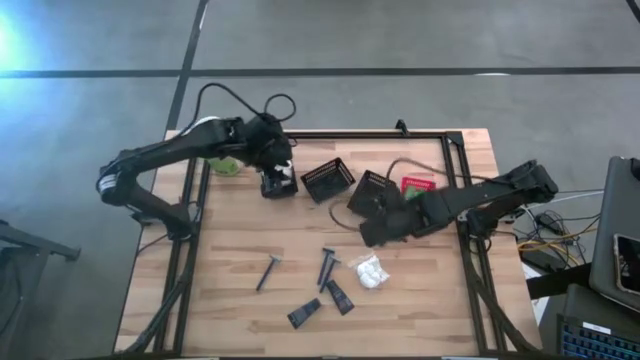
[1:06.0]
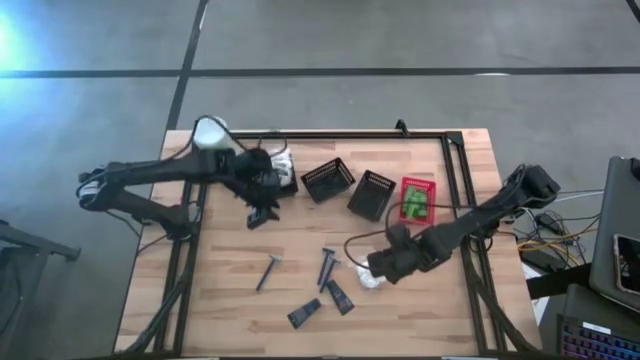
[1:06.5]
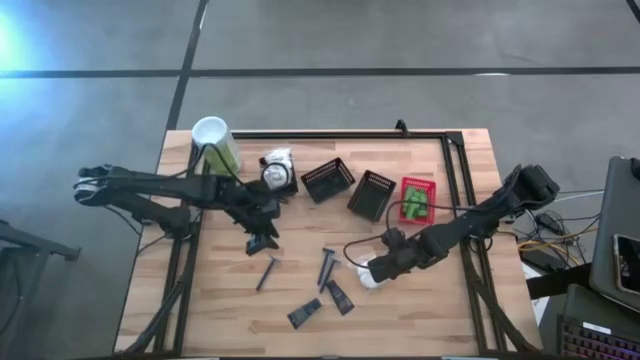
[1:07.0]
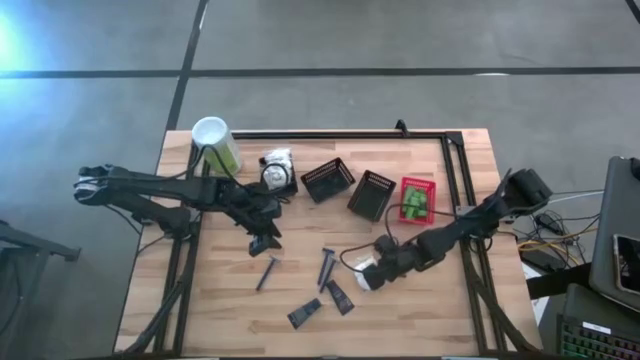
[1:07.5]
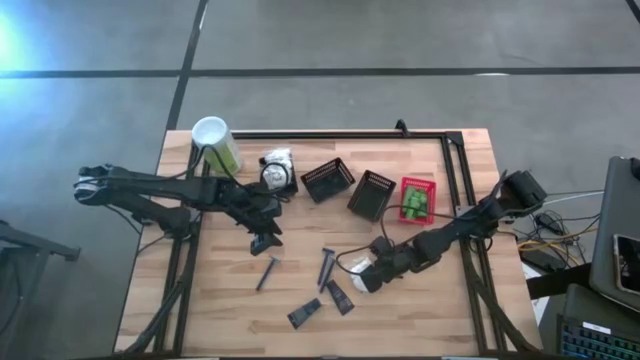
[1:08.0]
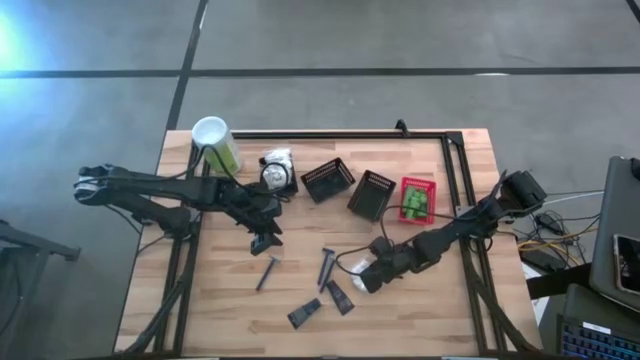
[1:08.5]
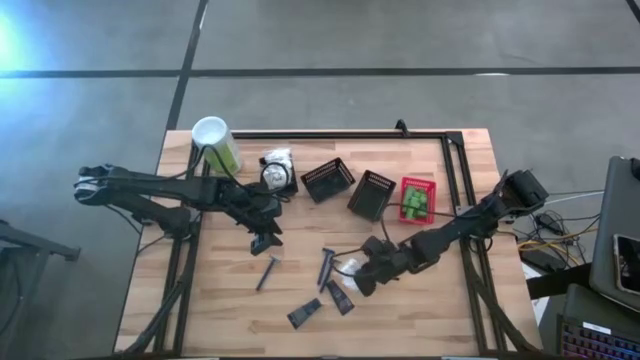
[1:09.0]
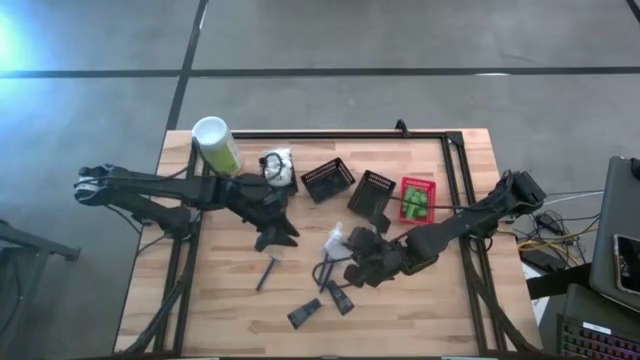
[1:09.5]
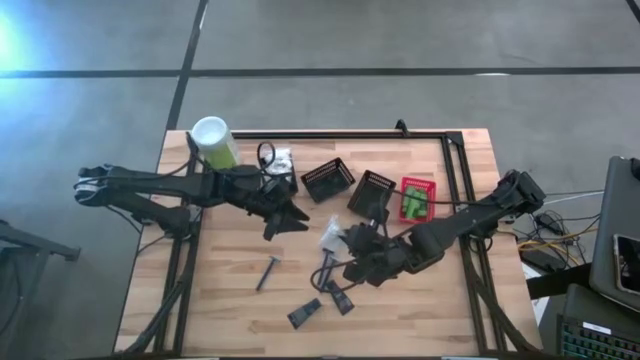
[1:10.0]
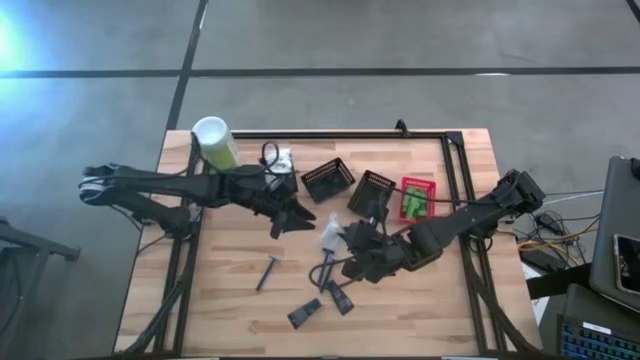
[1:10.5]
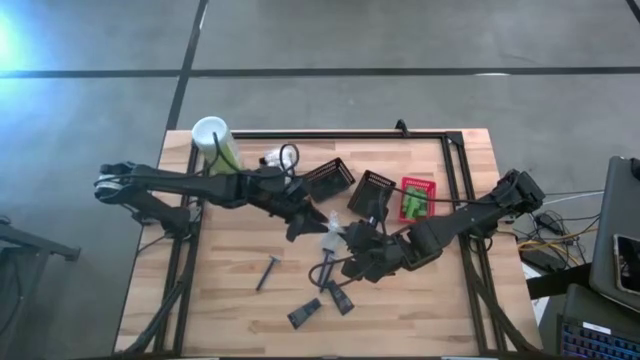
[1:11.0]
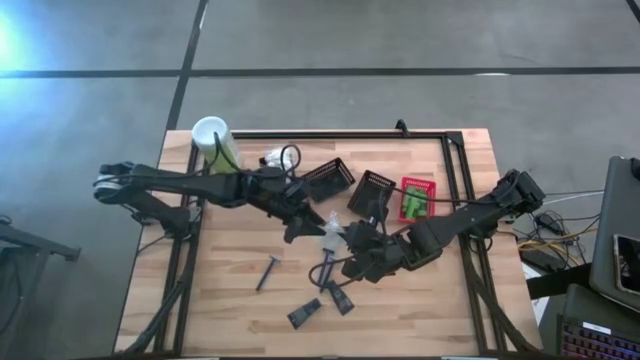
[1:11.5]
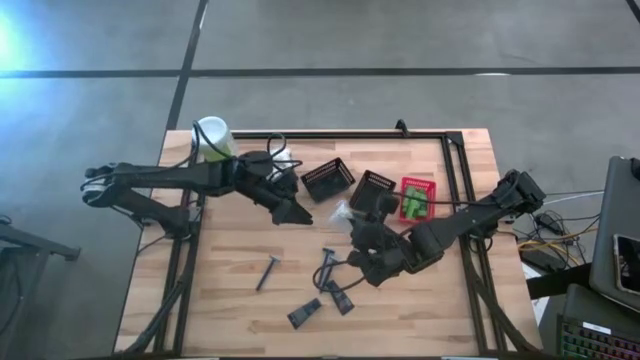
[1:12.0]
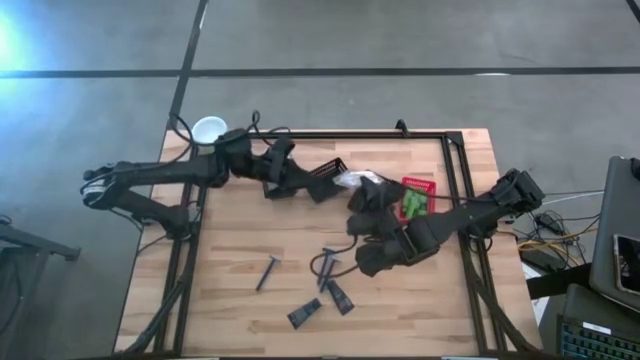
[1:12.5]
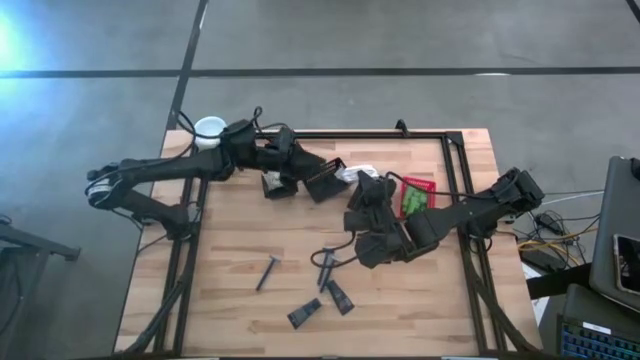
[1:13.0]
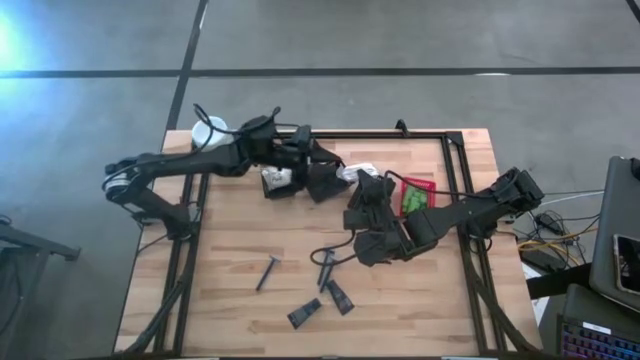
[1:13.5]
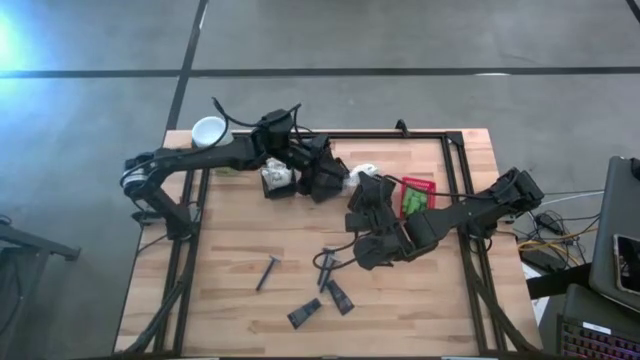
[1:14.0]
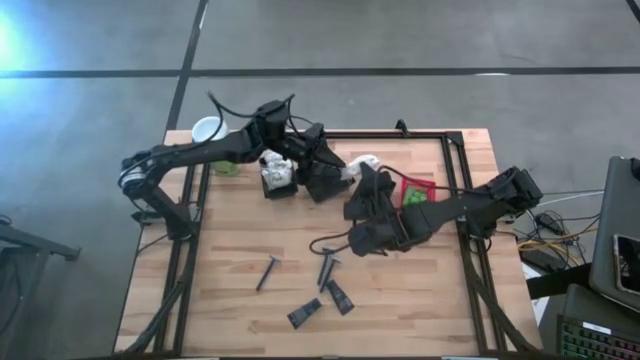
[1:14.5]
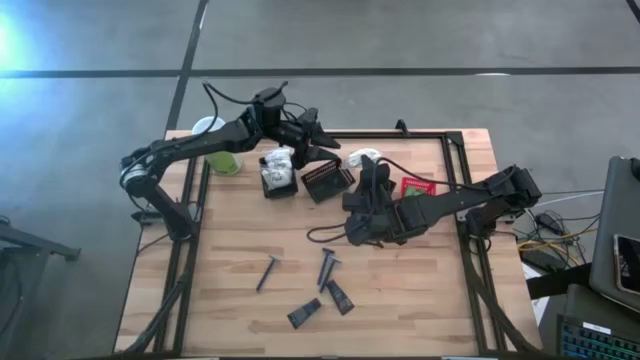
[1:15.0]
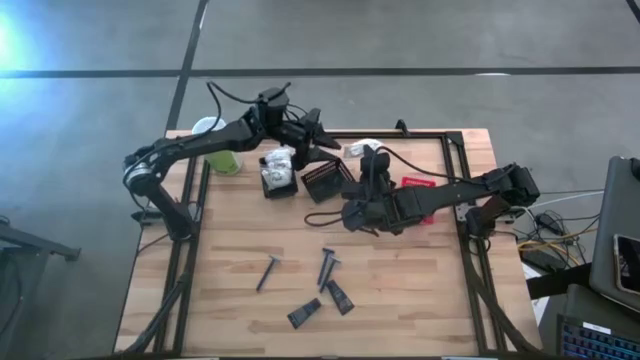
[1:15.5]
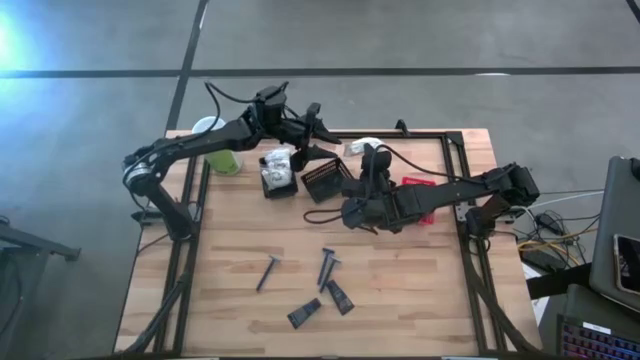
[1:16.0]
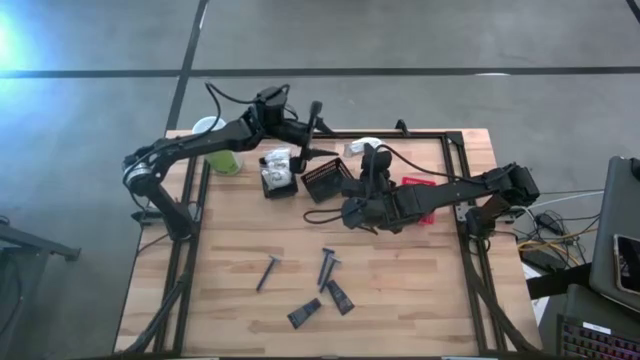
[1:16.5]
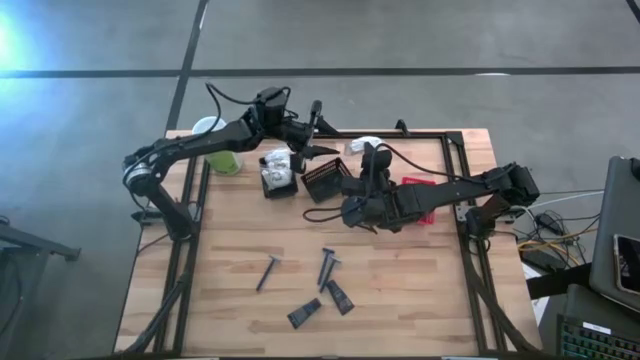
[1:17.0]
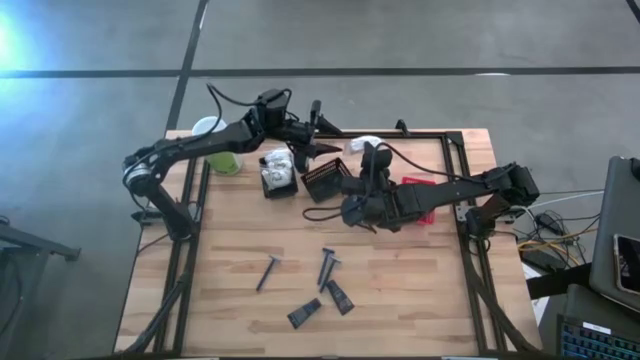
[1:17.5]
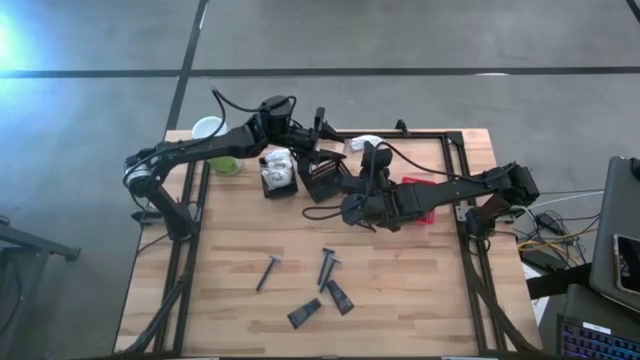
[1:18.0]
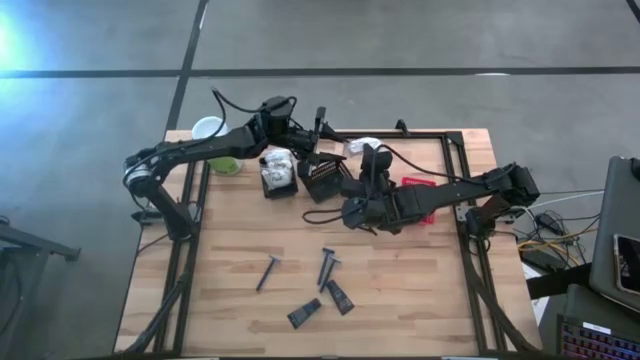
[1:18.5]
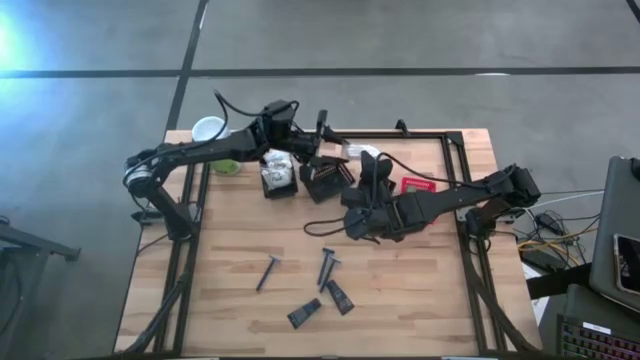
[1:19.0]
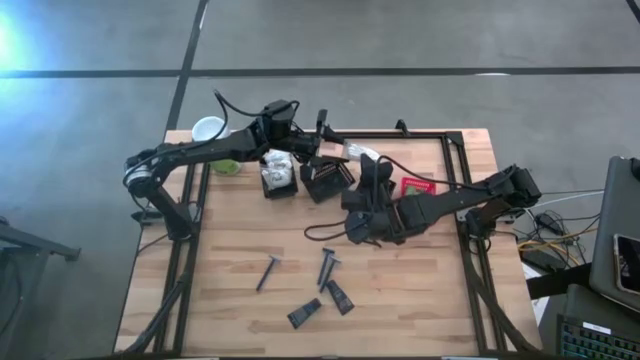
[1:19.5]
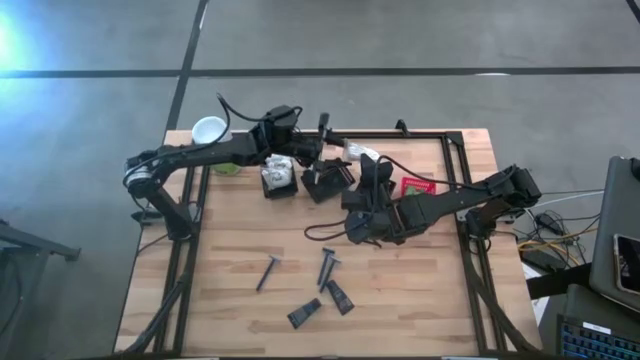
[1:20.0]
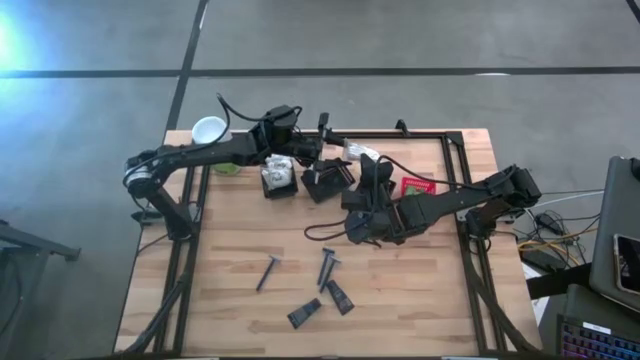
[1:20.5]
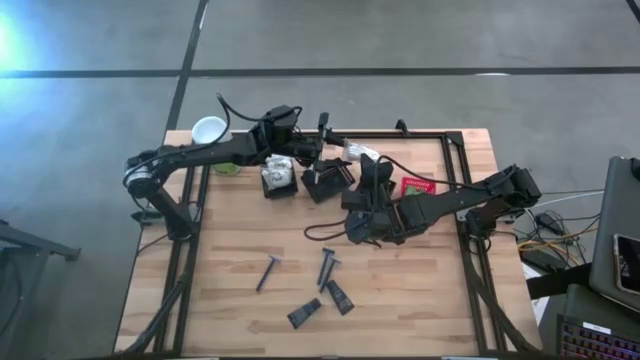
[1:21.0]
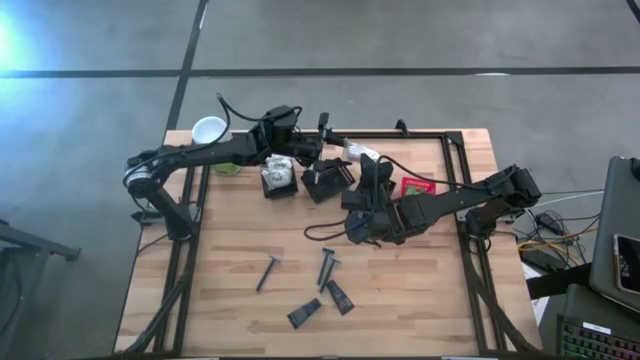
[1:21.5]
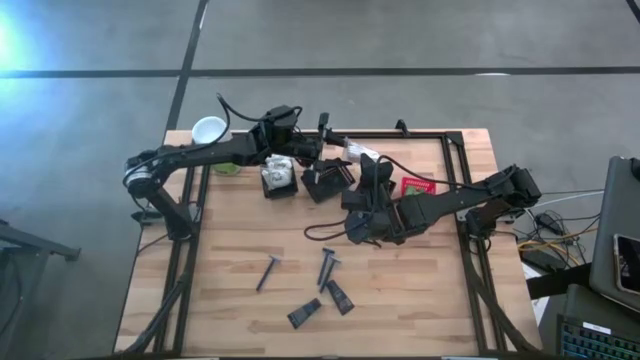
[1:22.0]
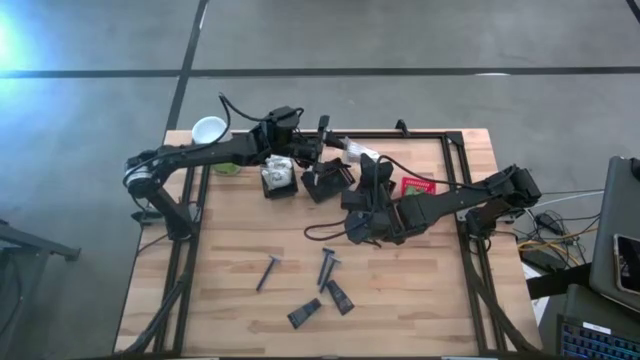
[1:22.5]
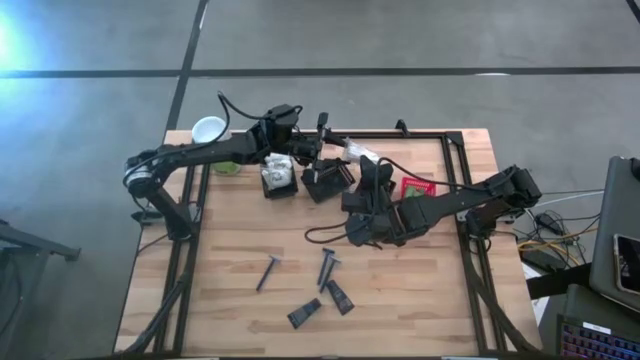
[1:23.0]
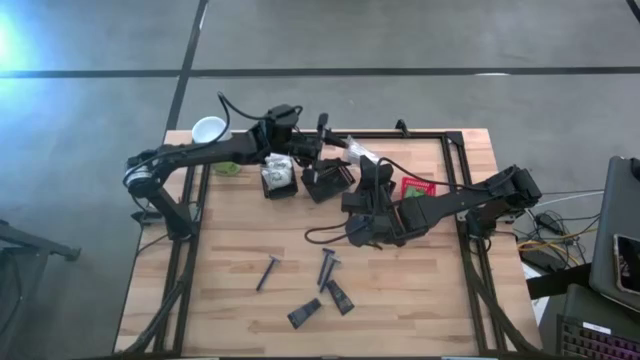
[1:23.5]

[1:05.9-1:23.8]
Task: Pick & Place Travel size toiletries
Put the cotton pack into the left black bin

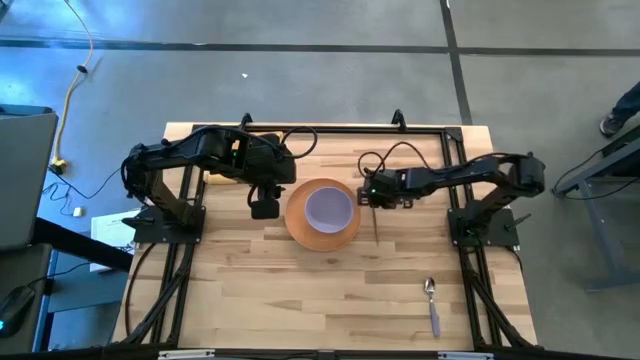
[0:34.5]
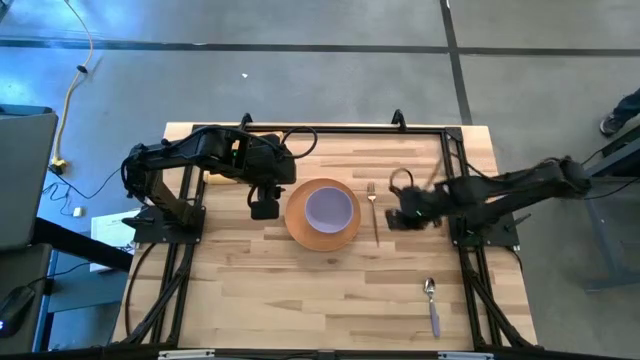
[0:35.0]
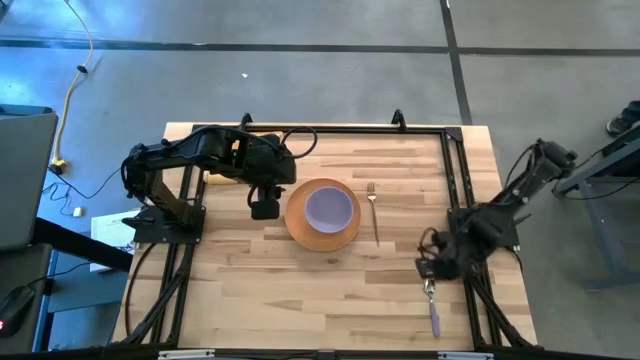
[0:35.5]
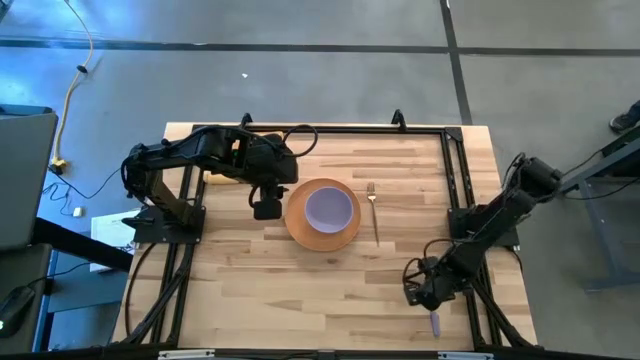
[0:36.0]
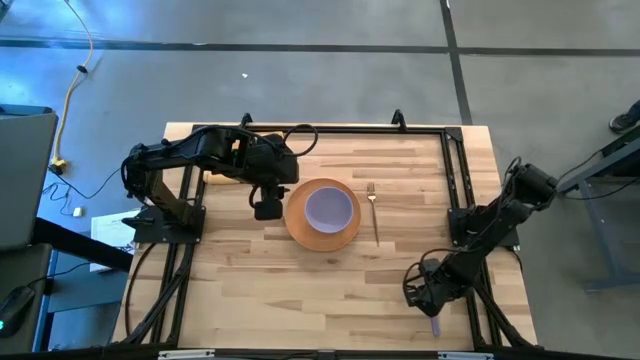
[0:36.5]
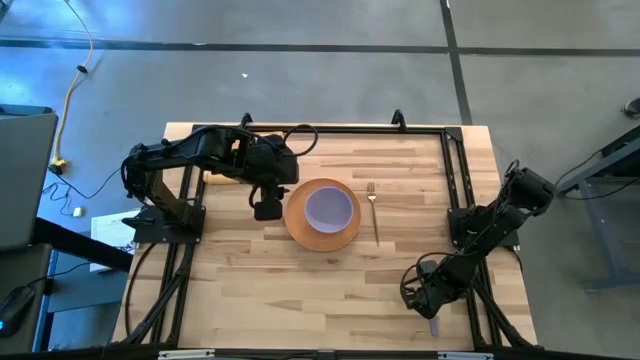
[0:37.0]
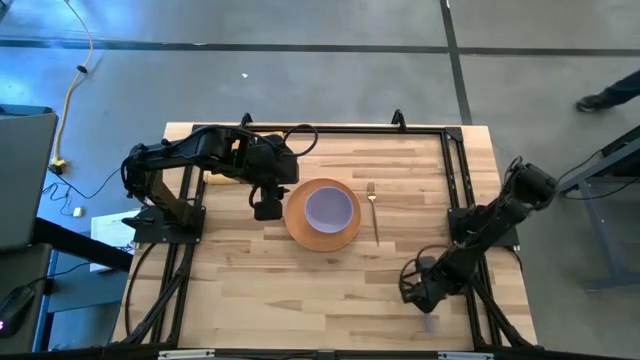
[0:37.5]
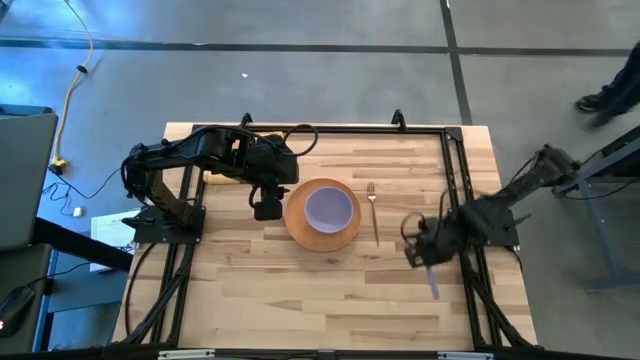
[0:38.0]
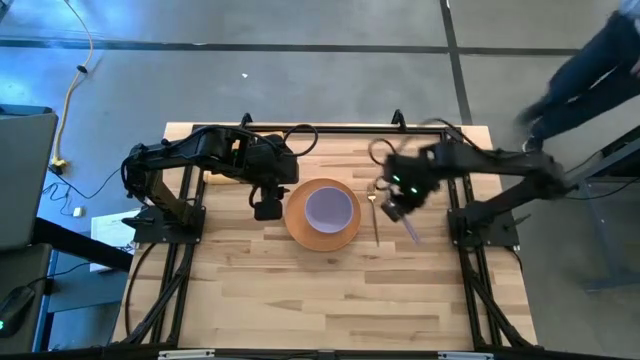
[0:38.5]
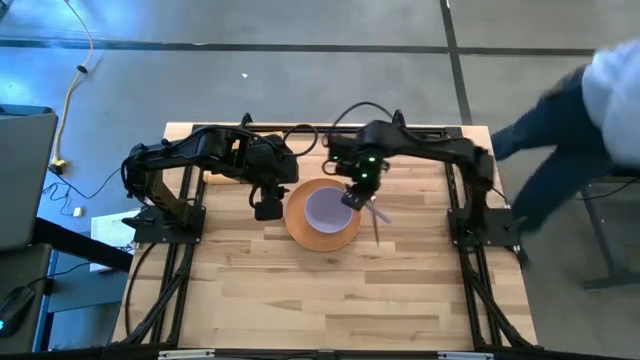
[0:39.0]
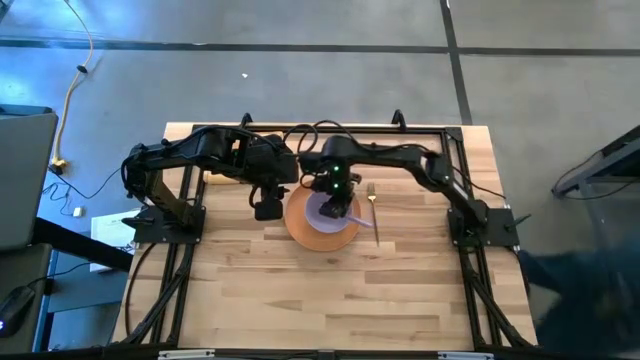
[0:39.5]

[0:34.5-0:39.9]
Task: Set table place
Put the purple spoon on the purple bowl
